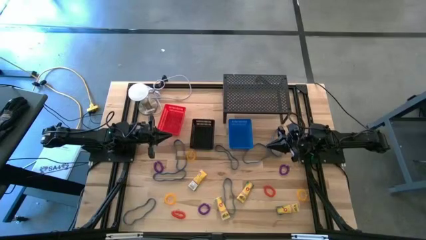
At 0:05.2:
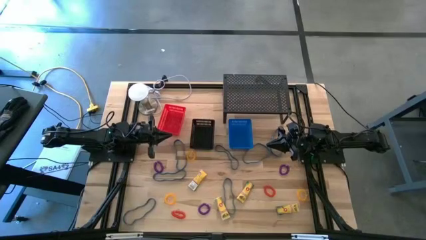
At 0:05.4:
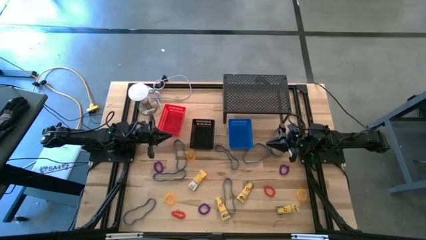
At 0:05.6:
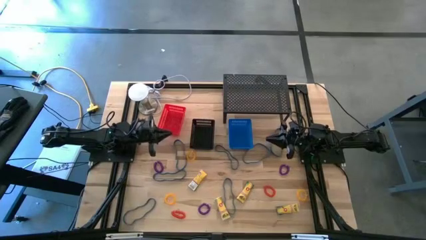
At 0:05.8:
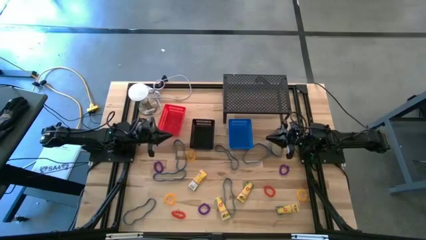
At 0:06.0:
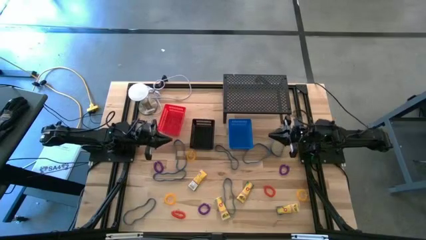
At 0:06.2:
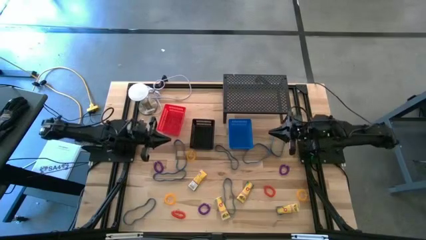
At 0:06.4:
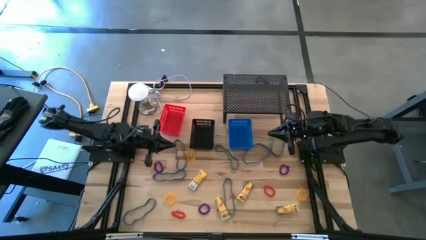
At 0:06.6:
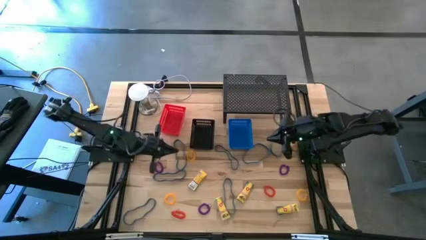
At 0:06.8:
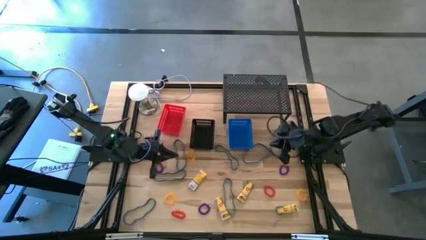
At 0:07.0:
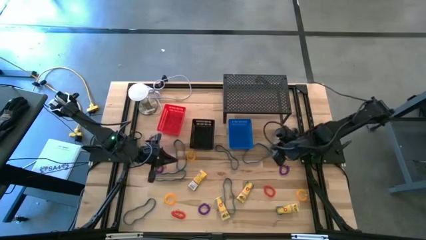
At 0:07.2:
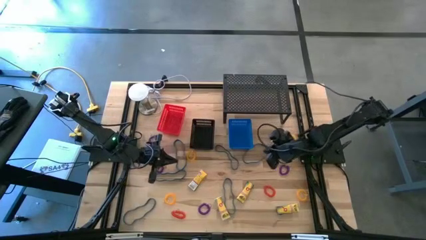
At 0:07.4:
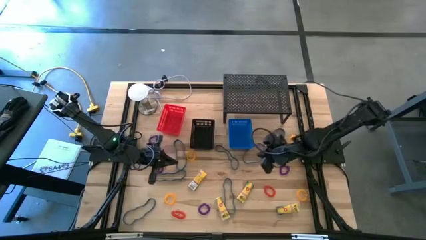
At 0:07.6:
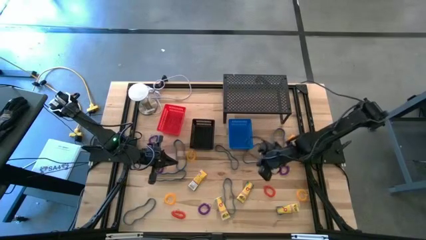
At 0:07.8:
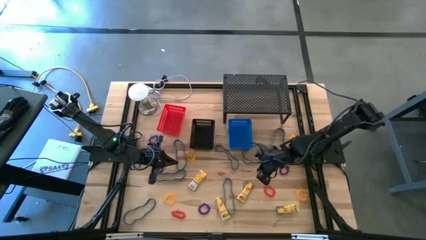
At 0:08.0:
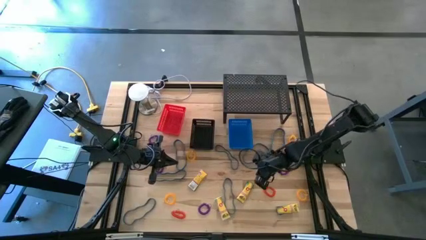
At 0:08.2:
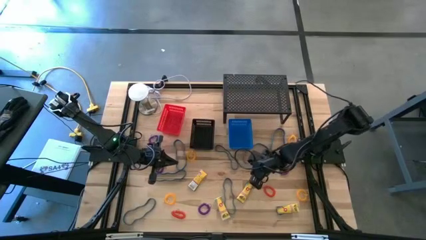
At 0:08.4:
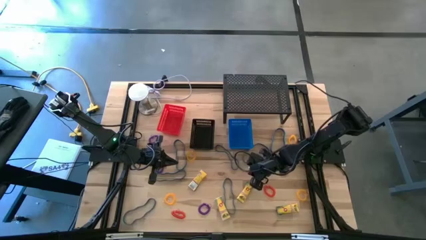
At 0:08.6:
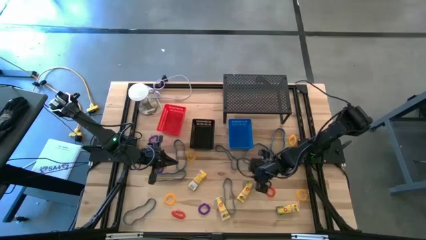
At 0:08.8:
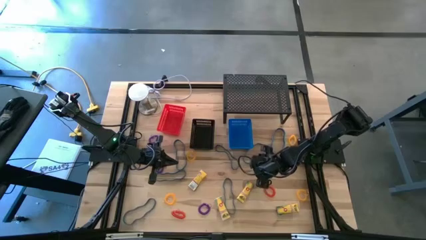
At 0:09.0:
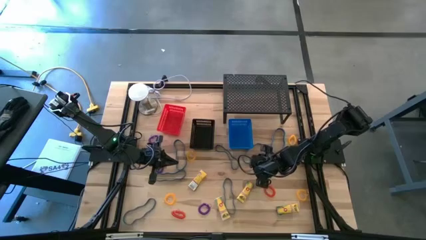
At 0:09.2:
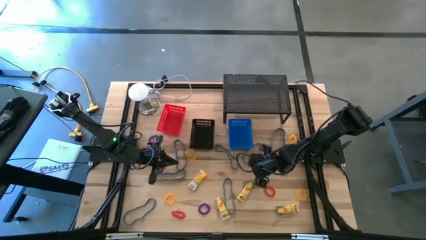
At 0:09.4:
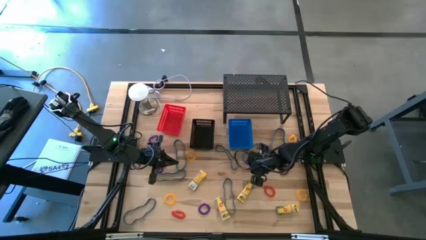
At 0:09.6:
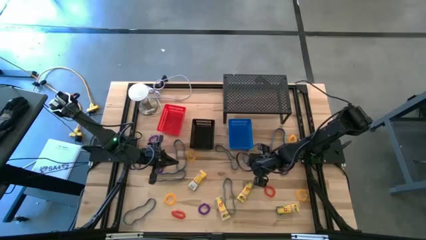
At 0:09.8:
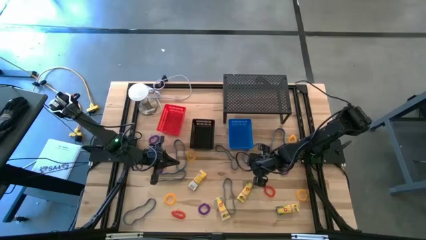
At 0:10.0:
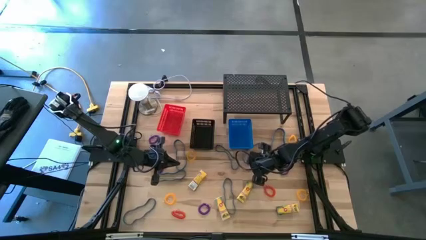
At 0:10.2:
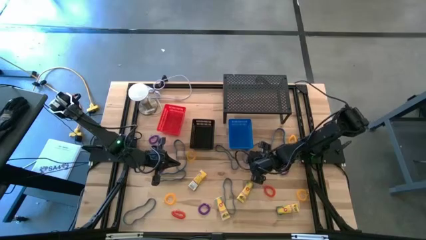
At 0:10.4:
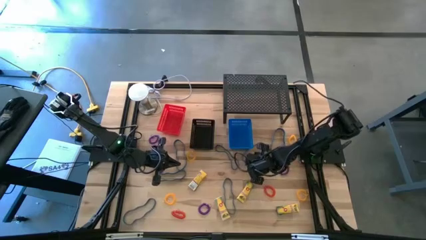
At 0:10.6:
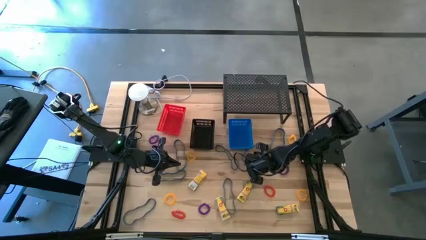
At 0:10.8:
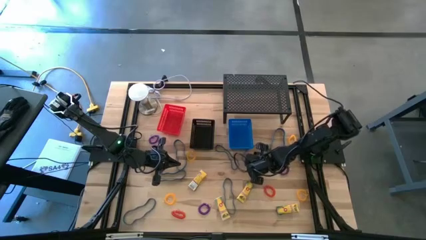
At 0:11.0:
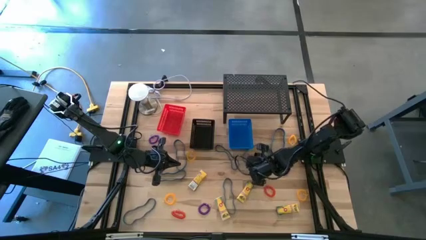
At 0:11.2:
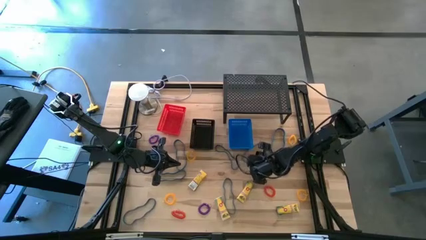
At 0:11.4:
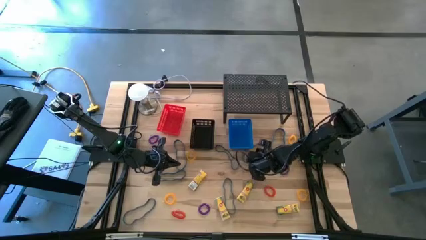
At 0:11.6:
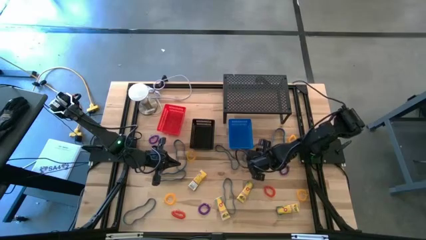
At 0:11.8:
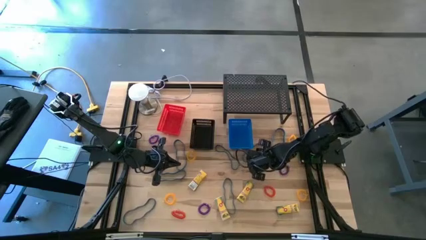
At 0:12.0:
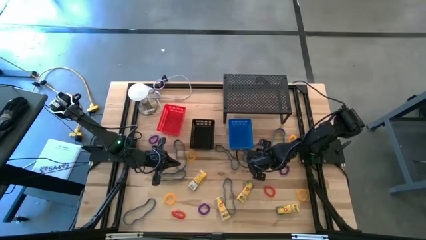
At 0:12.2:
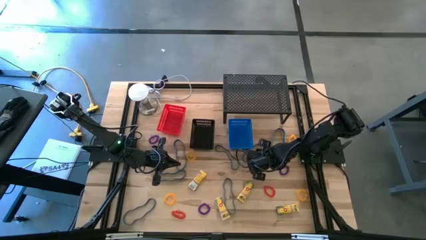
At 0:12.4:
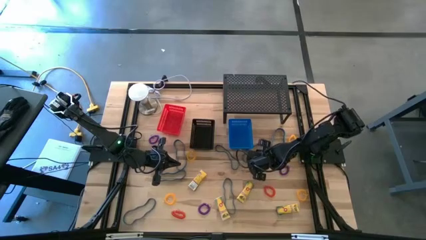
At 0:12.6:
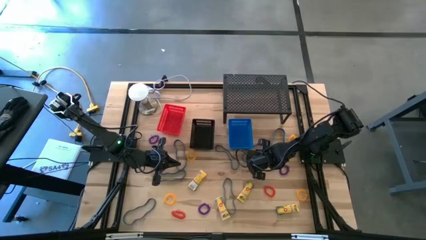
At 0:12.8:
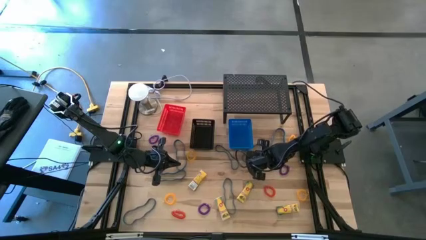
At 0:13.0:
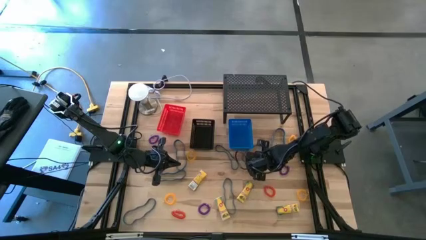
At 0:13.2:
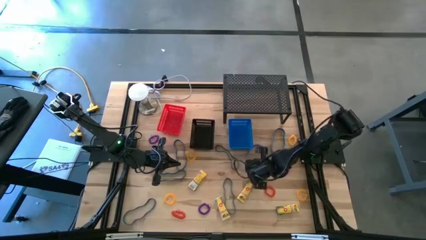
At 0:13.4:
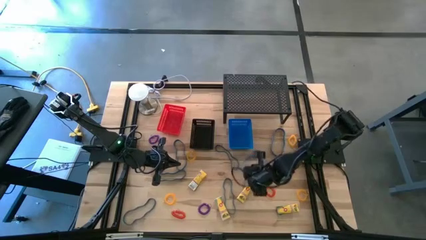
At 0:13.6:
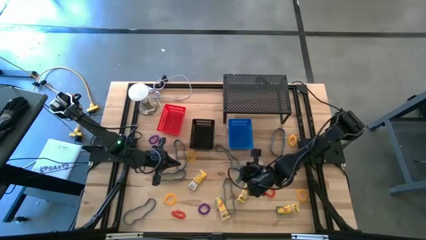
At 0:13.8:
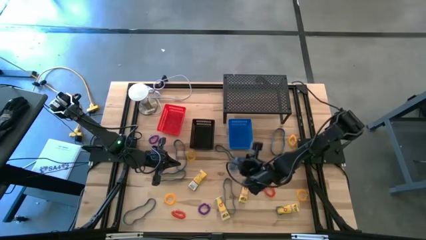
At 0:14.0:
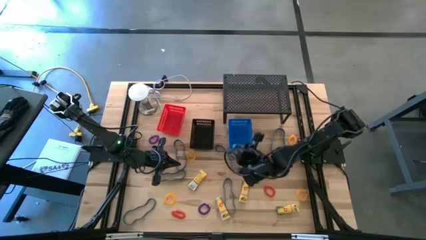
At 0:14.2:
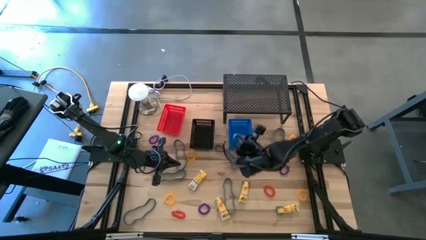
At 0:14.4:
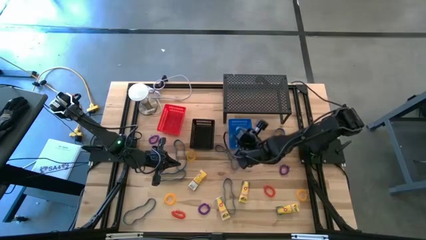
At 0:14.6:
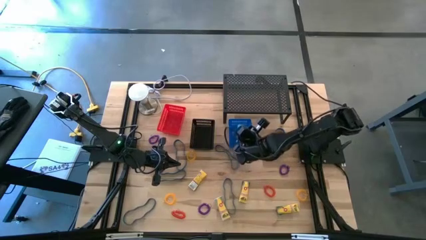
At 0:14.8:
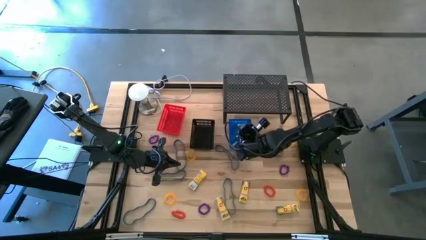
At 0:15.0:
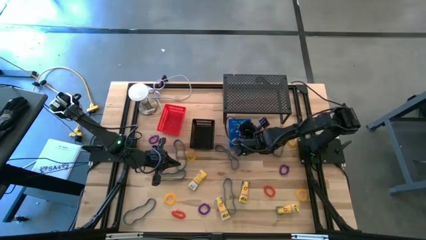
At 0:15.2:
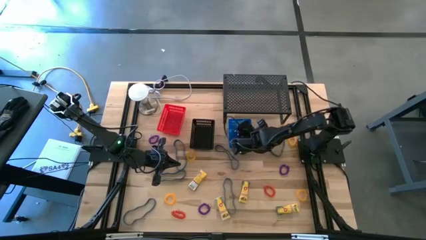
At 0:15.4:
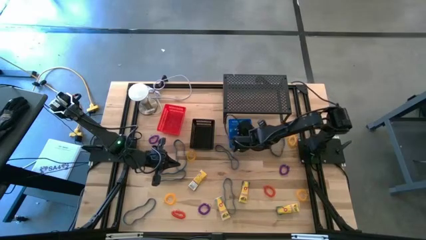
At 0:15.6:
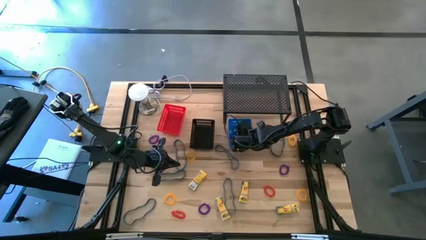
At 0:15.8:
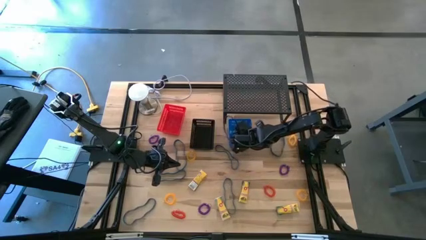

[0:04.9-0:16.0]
Task: Pick & Place Office Desk Supplies
Put the blue rubber band into the blue bin

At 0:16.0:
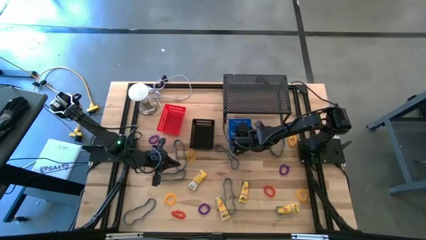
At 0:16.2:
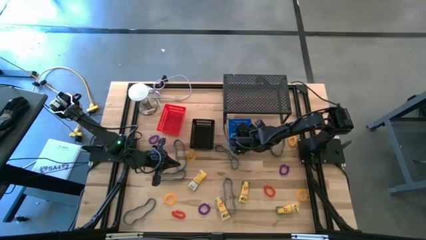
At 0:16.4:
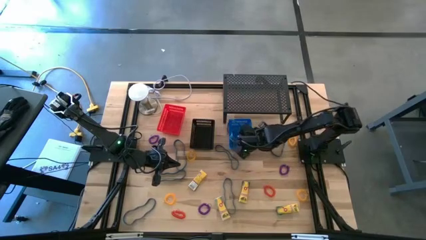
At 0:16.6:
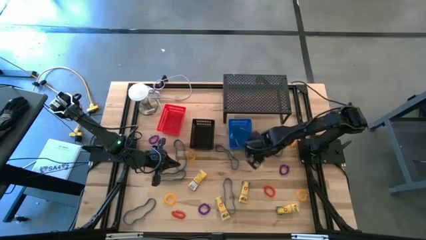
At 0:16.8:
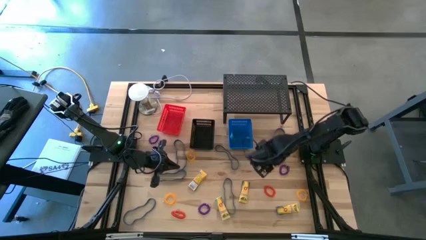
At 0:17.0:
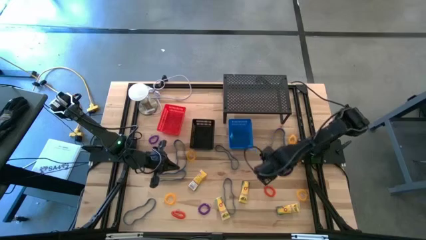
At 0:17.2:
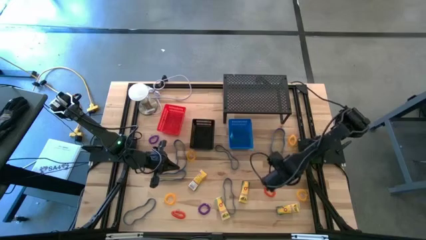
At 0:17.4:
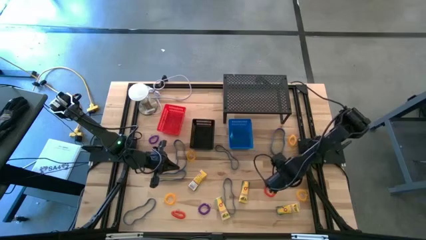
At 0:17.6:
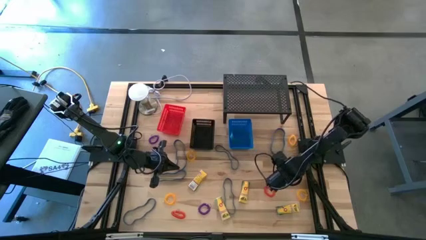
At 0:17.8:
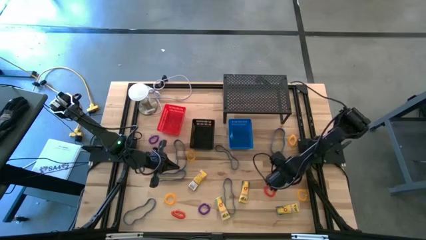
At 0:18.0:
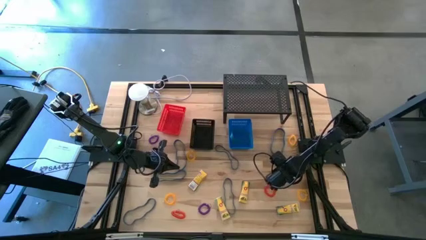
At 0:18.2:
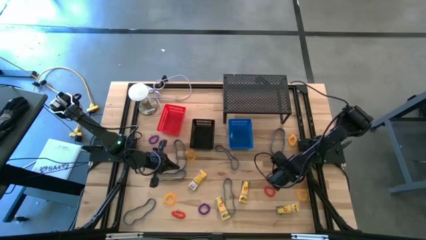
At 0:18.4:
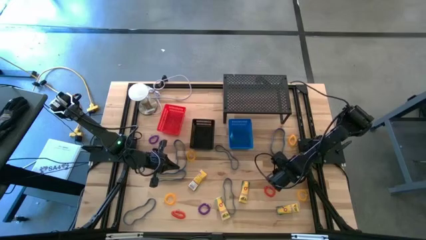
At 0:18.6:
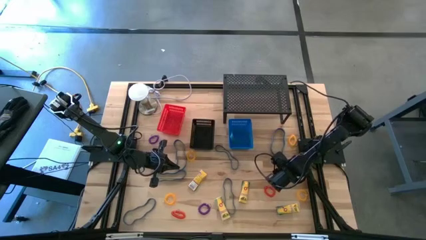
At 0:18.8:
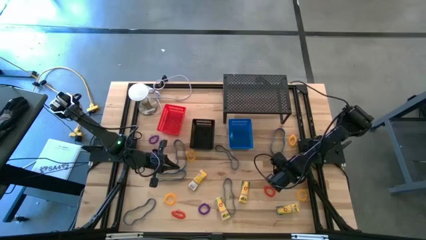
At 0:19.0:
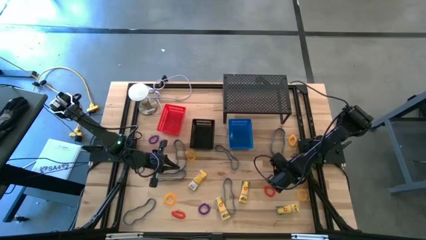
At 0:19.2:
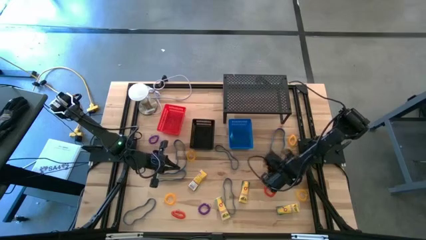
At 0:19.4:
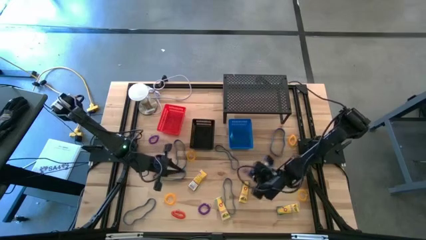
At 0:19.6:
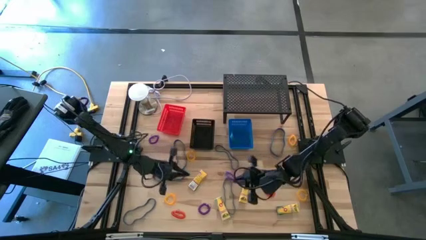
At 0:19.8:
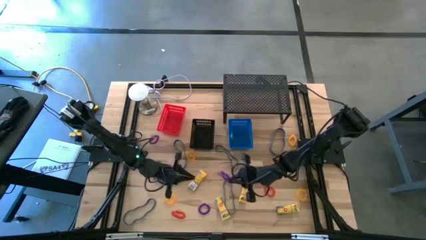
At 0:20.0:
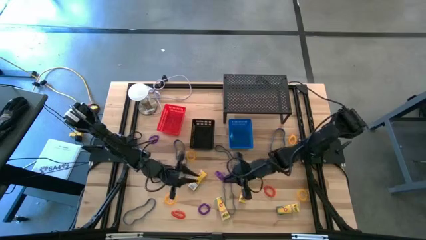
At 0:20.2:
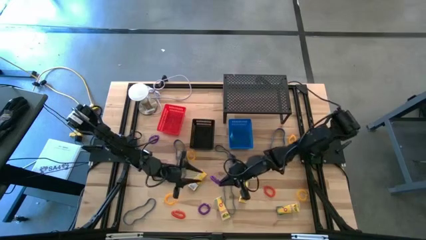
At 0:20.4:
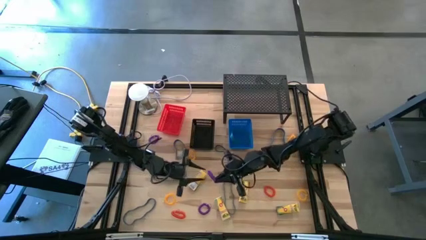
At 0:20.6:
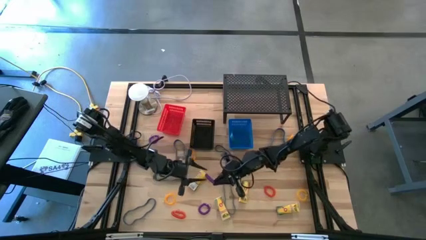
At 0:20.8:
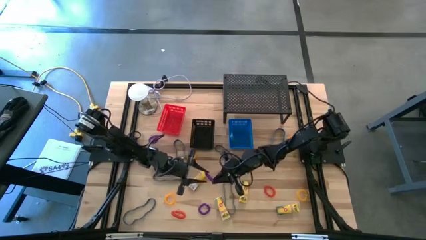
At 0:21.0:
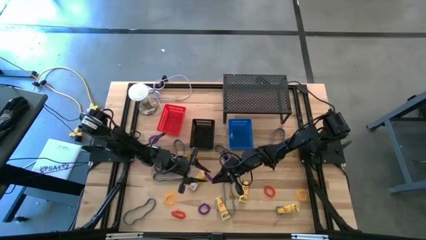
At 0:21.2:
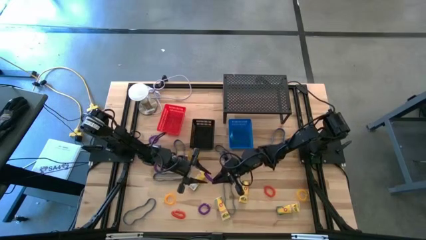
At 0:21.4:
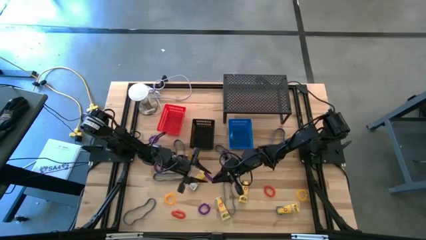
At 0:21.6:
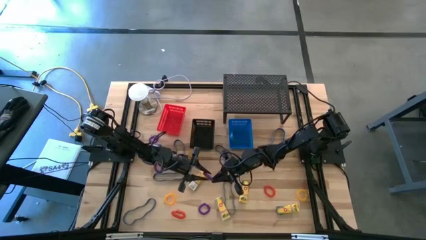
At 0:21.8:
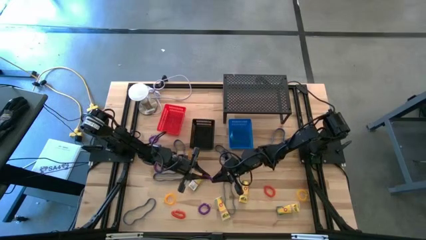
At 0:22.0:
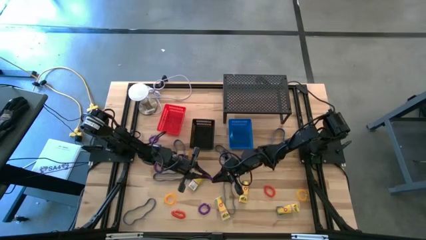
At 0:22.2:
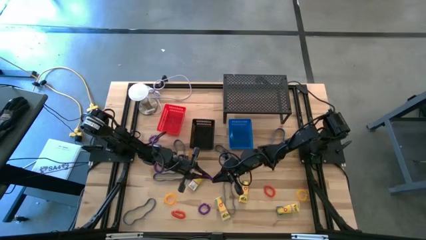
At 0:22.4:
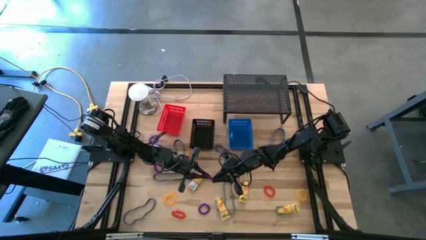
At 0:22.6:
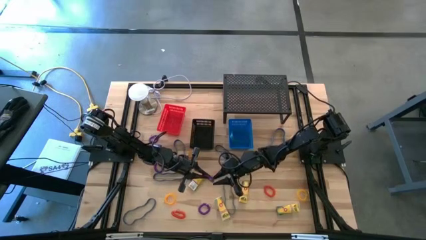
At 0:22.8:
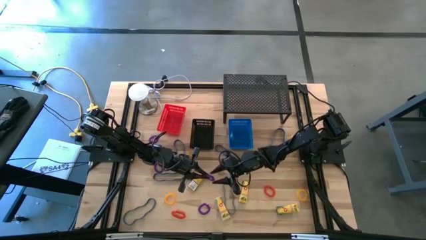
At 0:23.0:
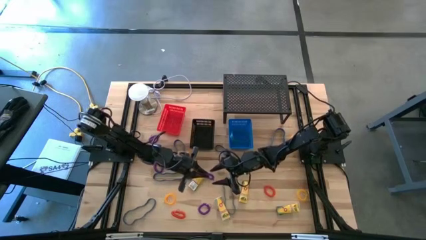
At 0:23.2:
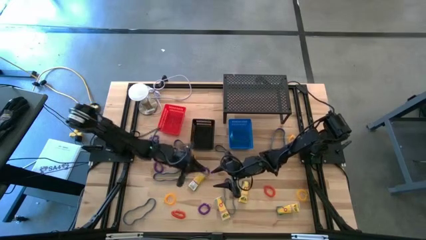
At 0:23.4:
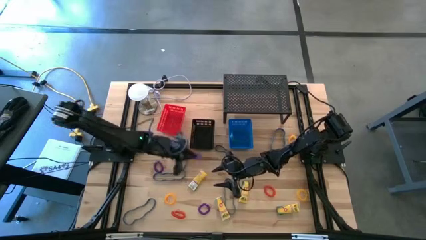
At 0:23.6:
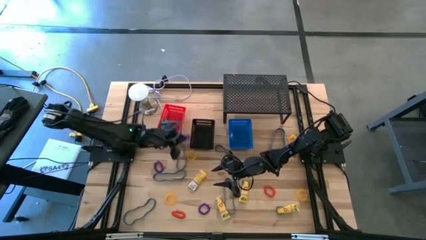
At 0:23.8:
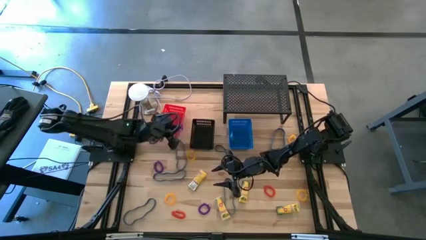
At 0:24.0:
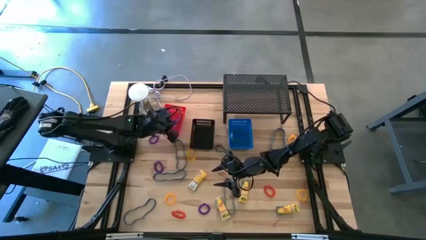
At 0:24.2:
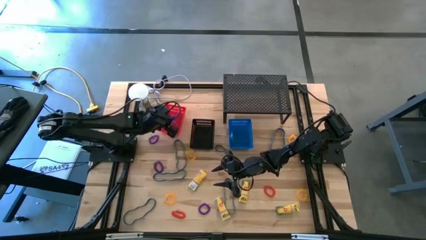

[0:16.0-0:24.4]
Put the right purple wrist coil keychain into the orange bin
